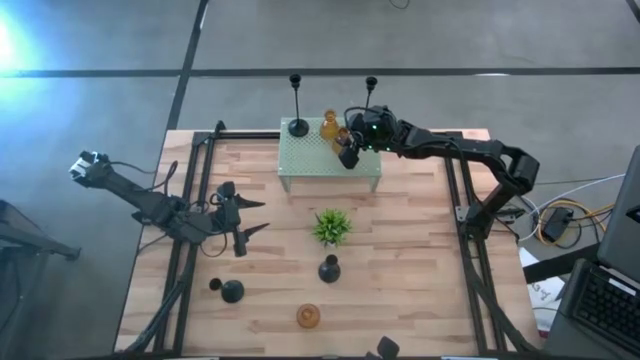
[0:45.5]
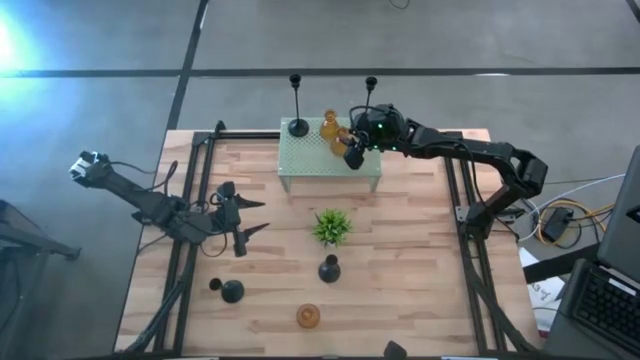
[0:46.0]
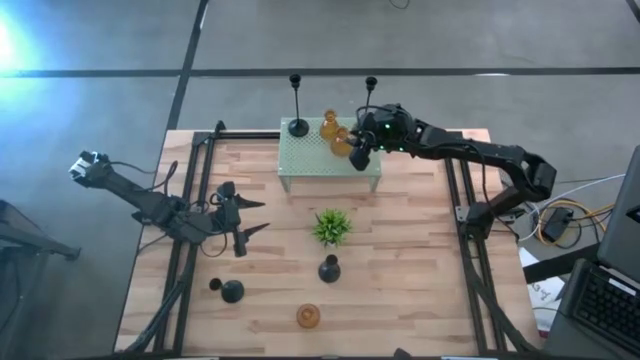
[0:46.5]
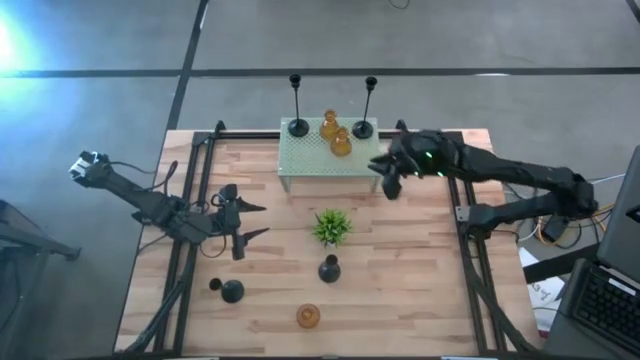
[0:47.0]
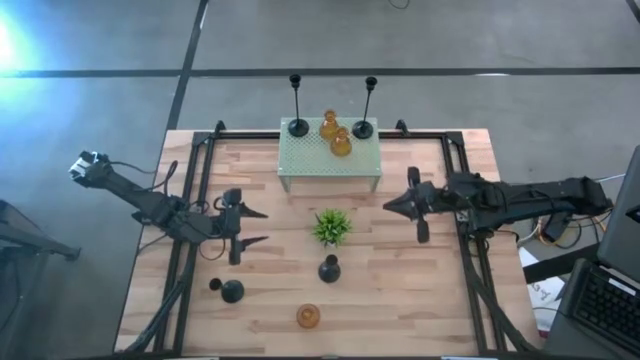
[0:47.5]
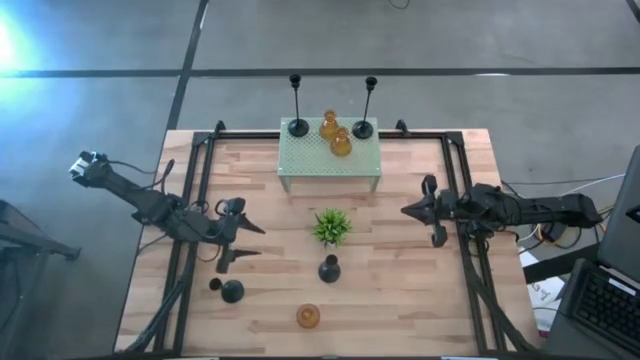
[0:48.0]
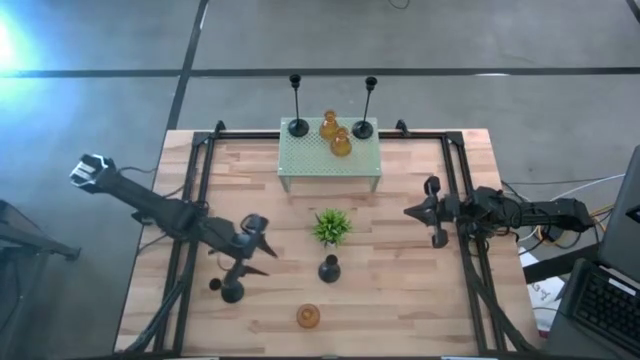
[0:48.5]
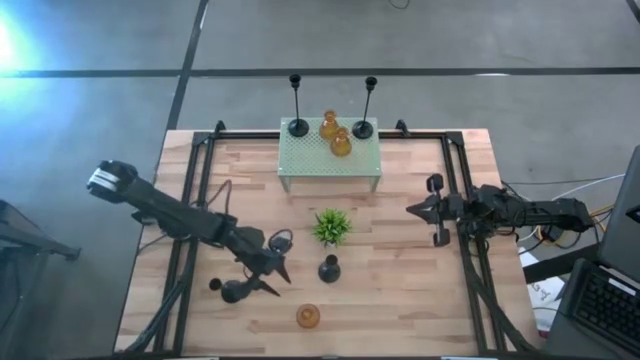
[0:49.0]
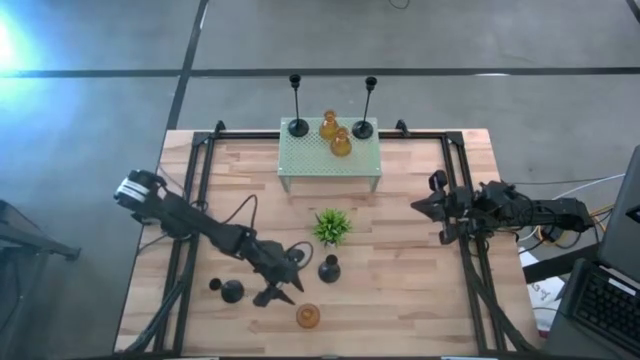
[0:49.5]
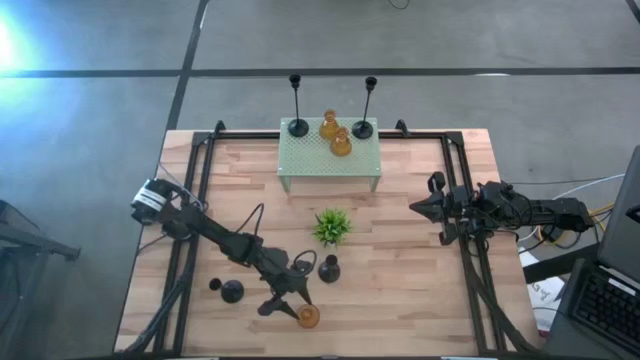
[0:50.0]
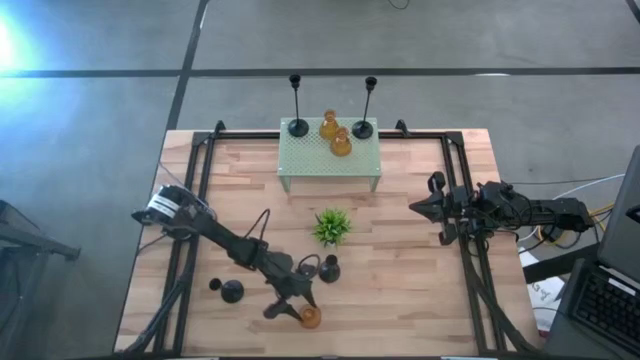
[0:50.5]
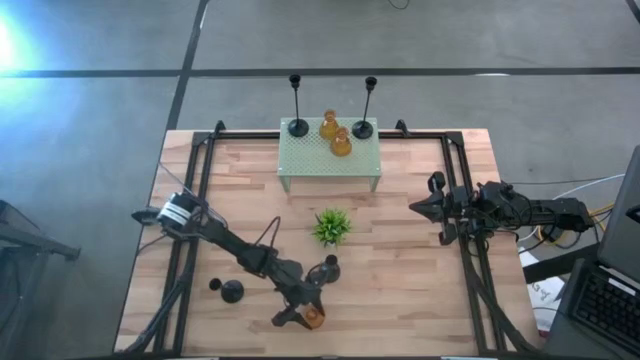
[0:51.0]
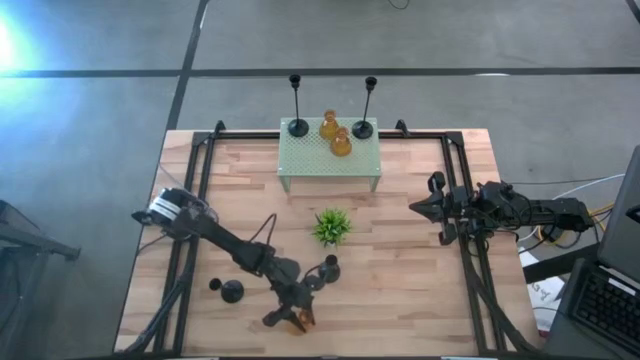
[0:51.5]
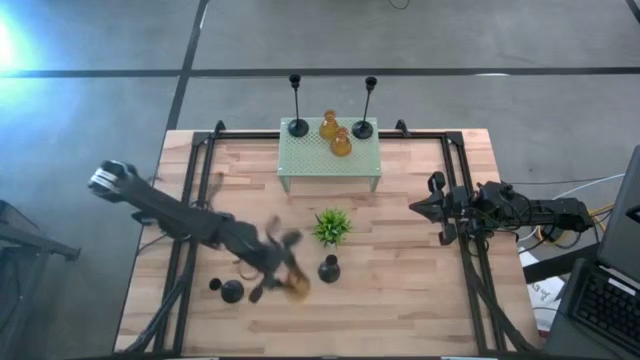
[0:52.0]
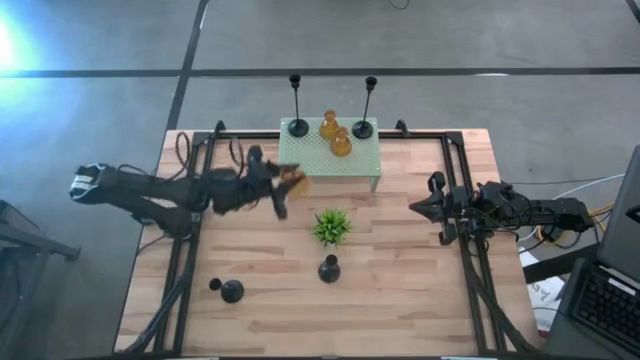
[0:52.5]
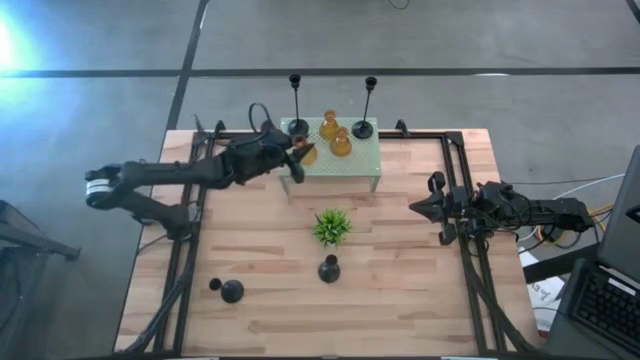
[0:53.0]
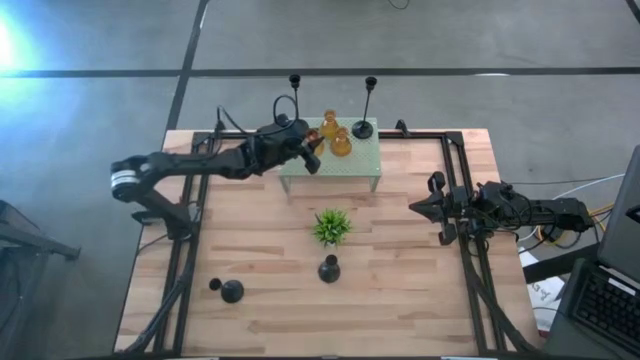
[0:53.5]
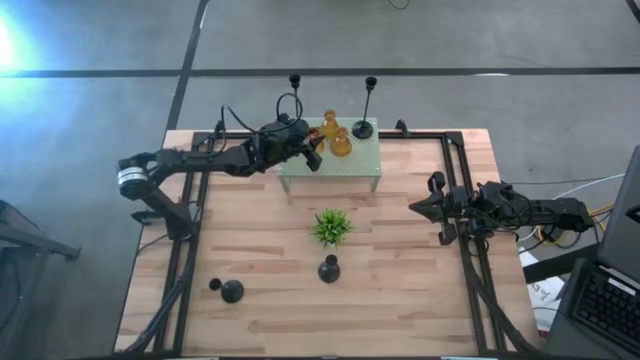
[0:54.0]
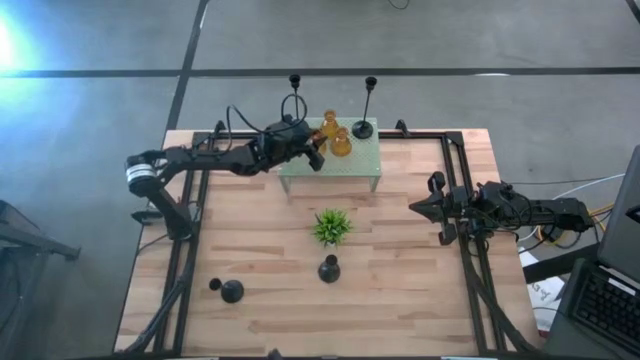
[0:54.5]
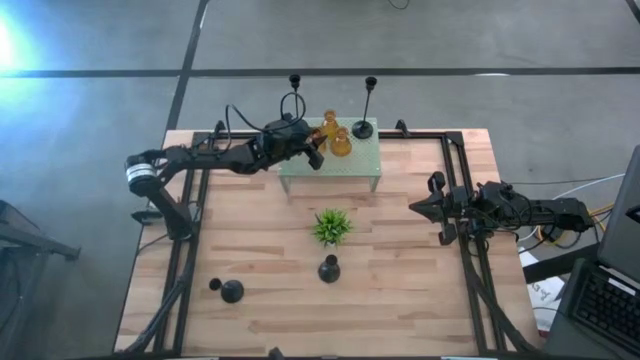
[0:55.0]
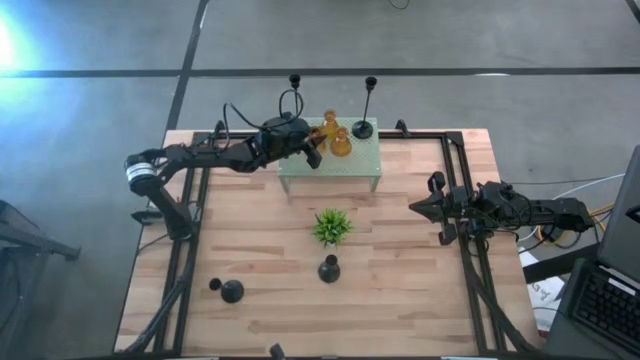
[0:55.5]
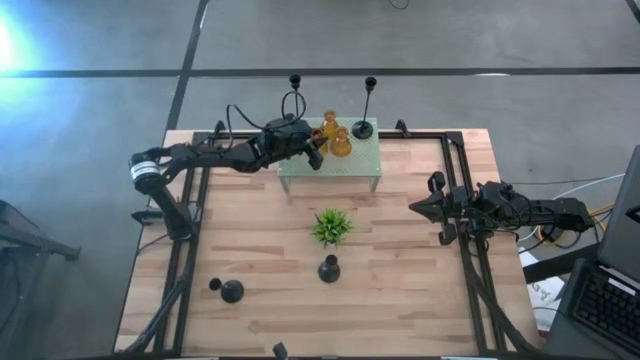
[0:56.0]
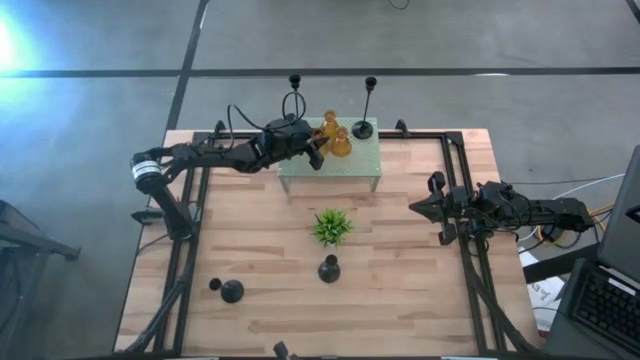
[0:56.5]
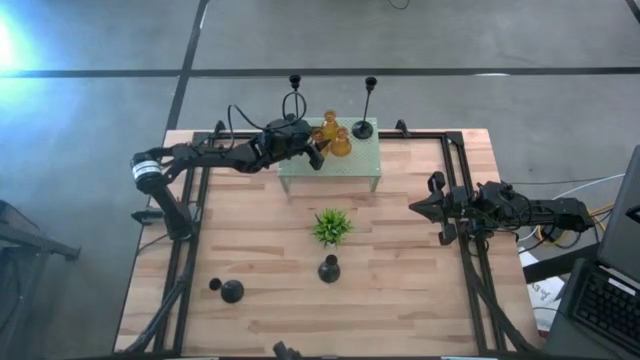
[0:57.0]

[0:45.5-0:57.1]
Task: Pick & Place candle stick holders
Put the orange candle holder on the shelf

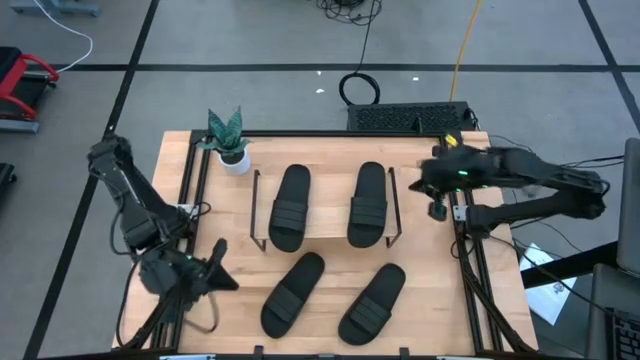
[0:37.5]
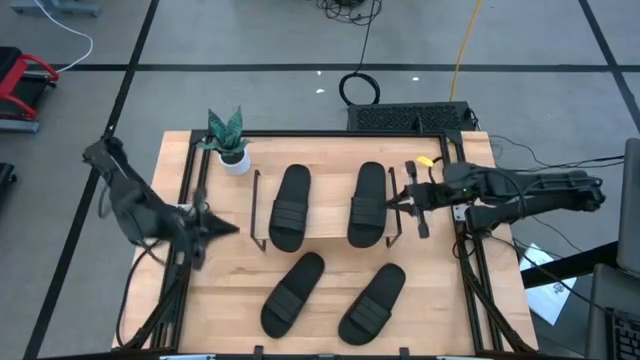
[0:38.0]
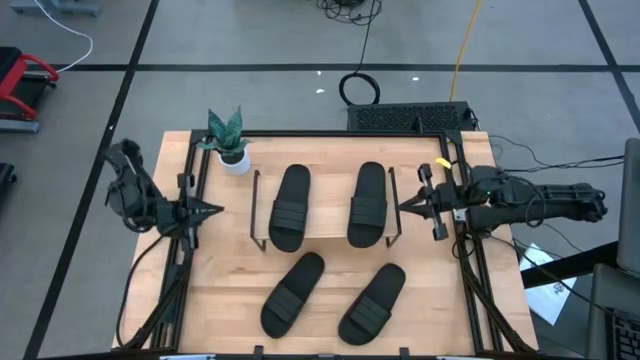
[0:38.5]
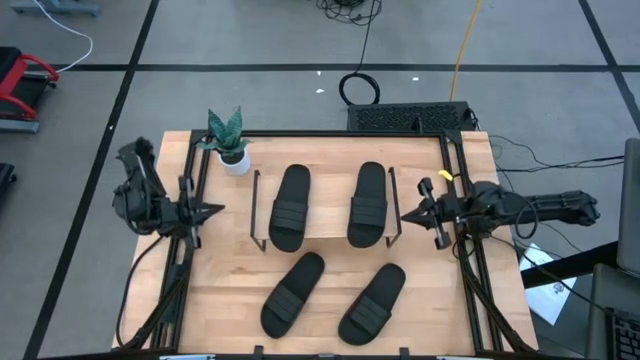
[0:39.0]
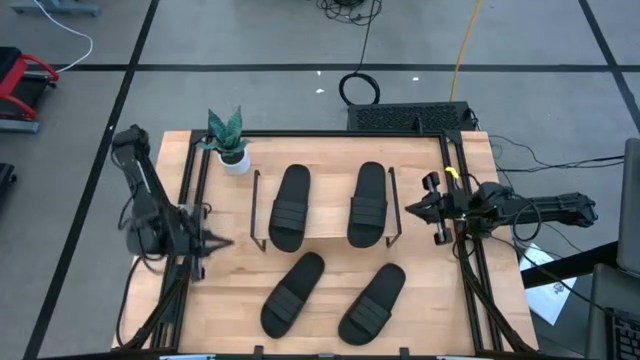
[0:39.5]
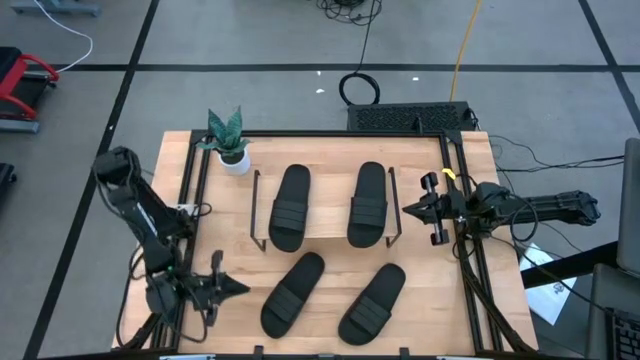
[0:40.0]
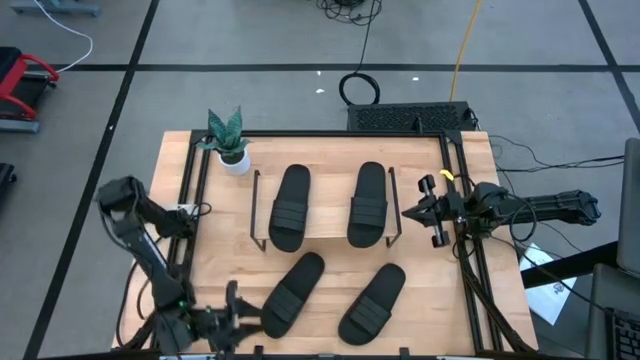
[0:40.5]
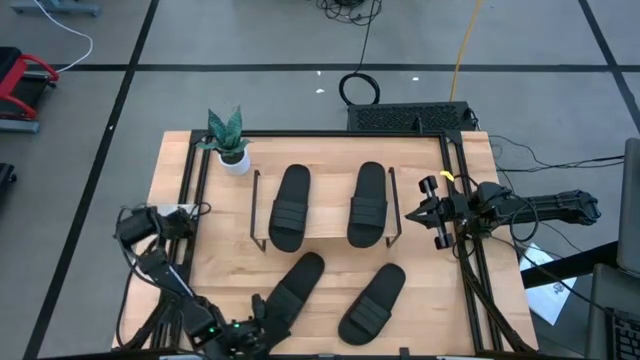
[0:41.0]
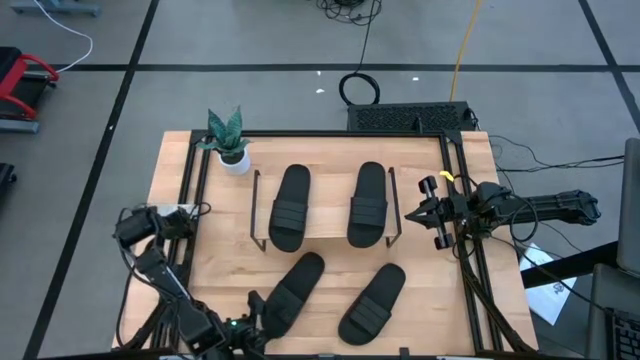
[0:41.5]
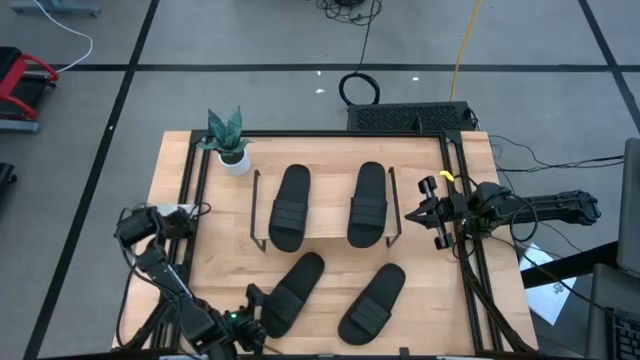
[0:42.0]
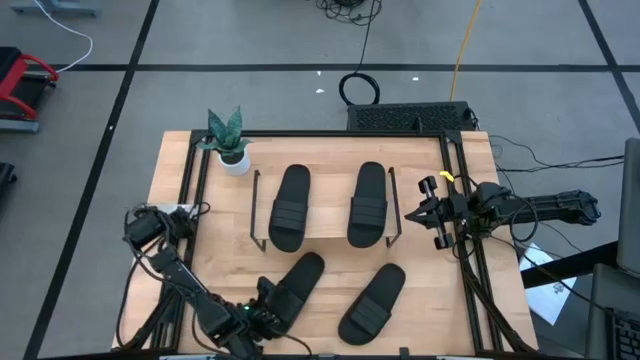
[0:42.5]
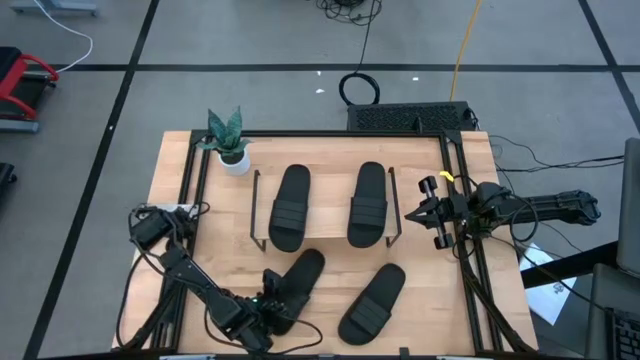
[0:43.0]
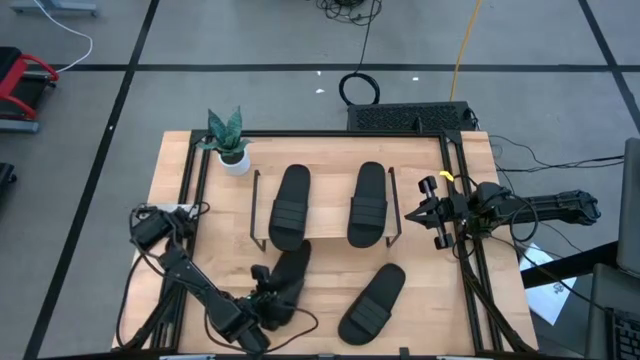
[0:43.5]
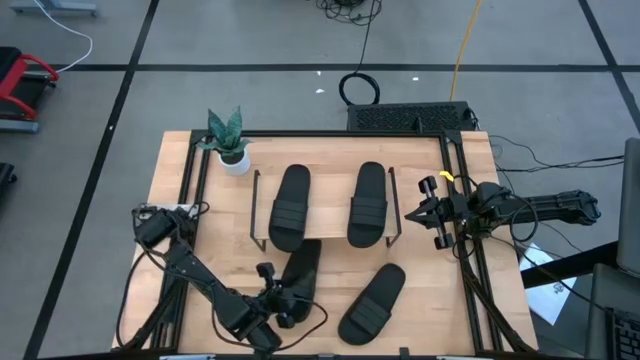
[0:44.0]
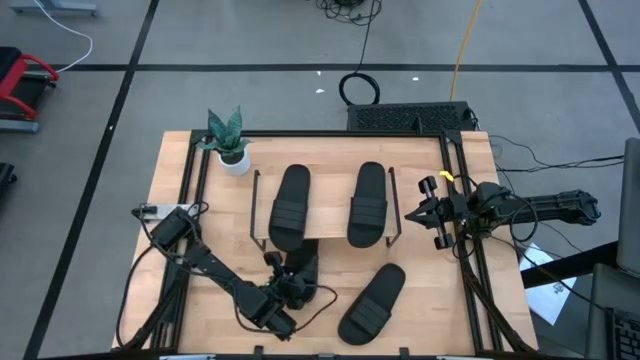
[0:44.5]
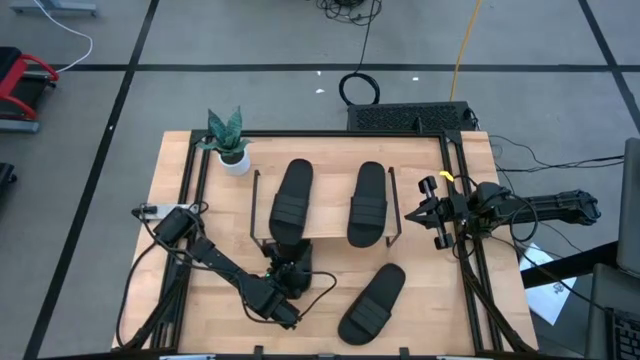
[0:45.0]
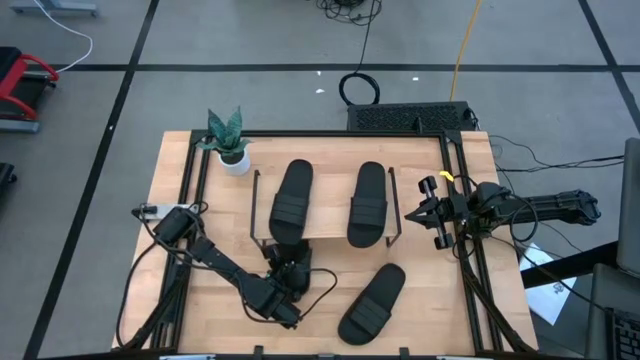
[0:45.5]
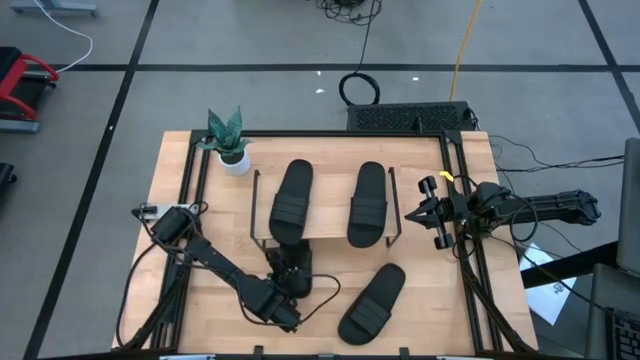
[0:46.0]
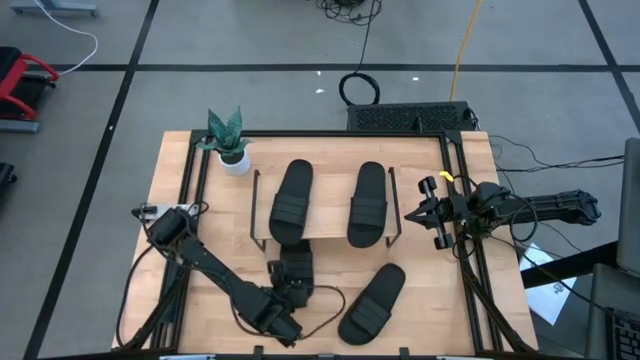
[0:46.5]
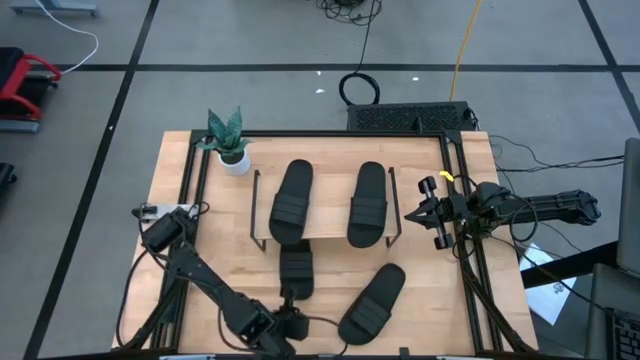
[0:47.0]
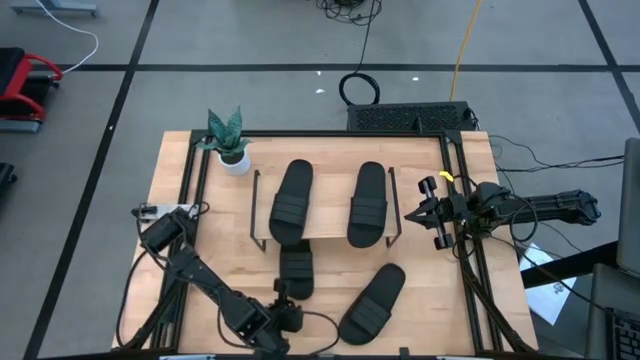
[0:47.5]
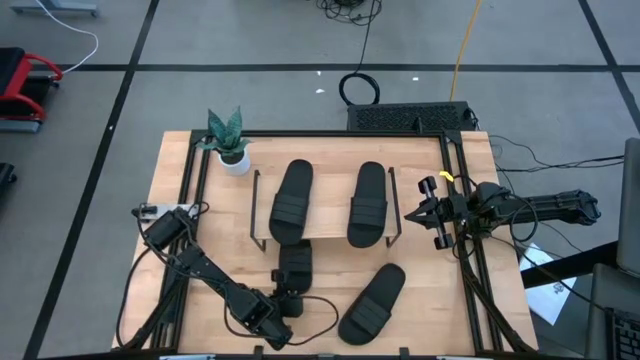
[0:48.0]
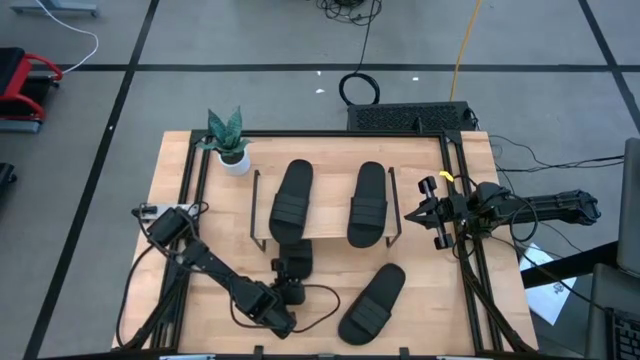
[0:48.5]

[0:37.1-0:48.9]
Task: Pick and place slides into the shelf
Put the black slipper under the shelf
